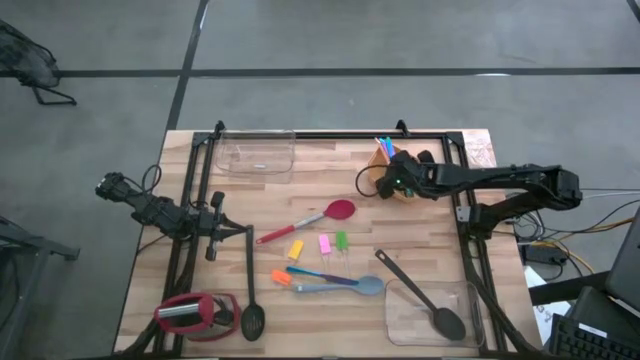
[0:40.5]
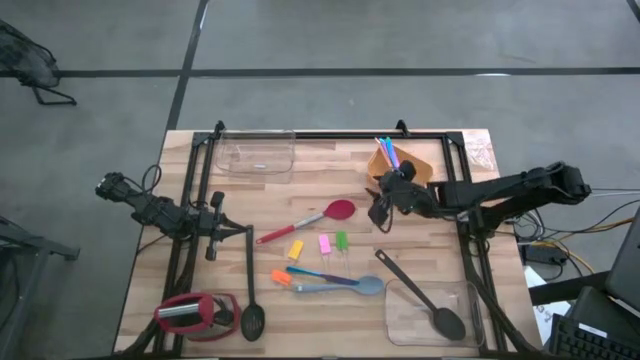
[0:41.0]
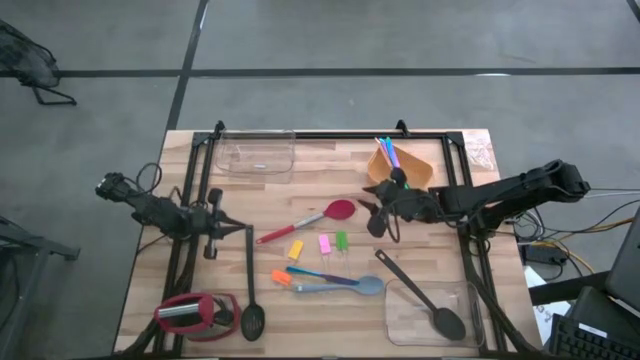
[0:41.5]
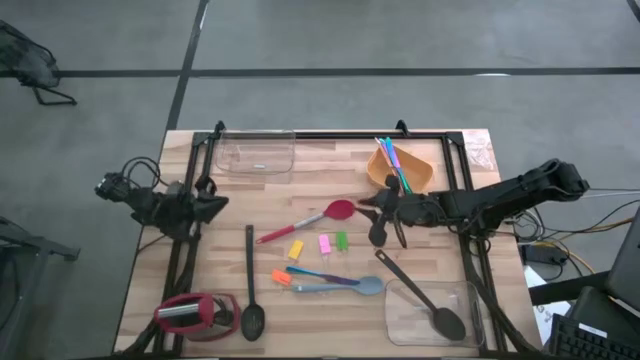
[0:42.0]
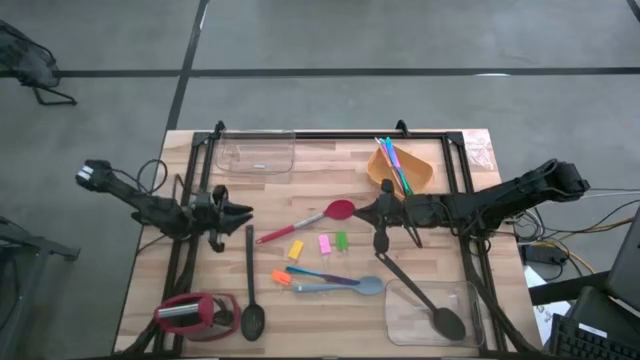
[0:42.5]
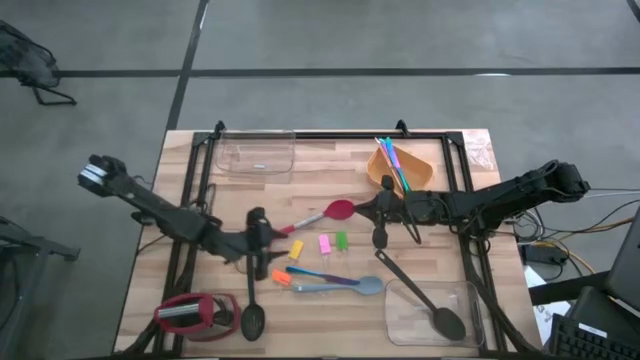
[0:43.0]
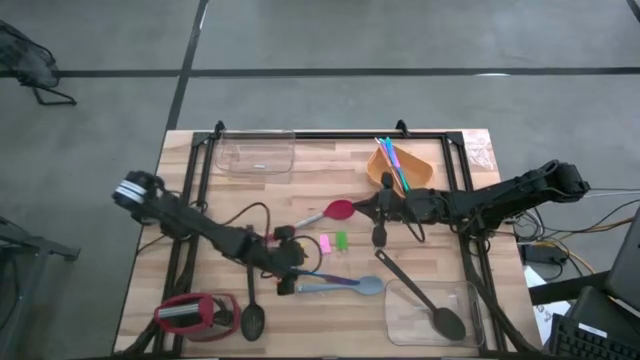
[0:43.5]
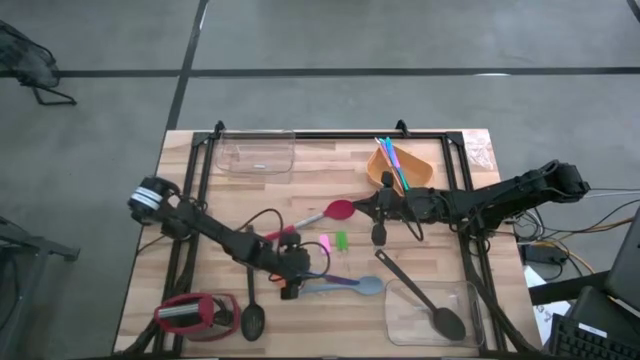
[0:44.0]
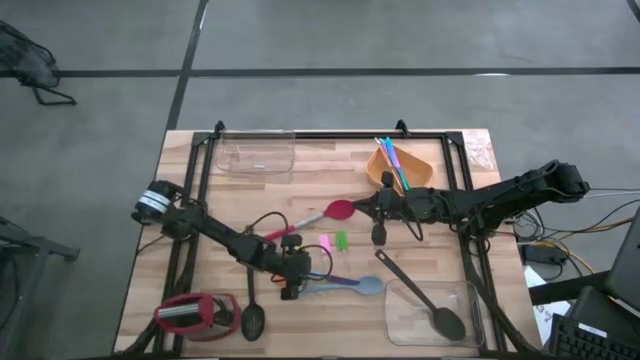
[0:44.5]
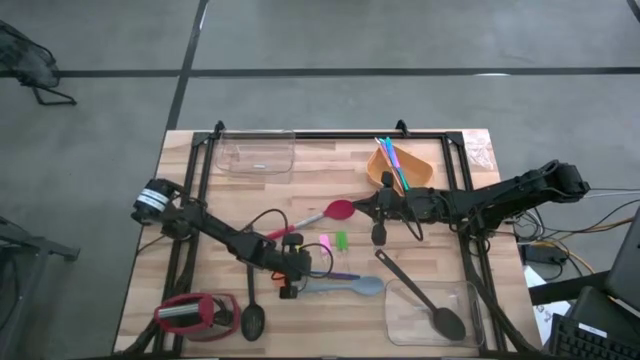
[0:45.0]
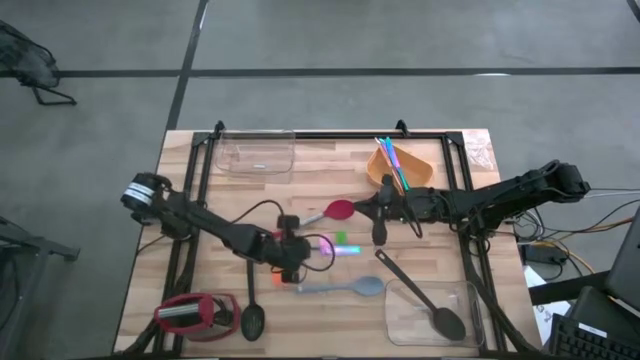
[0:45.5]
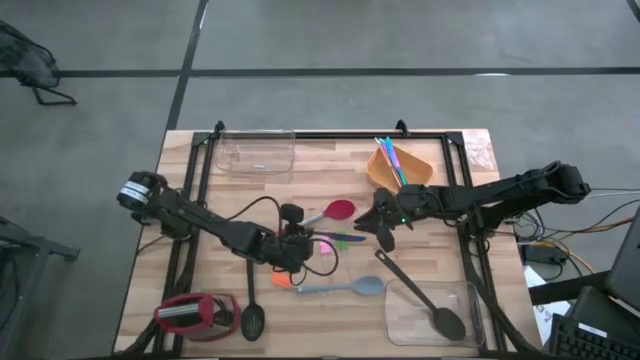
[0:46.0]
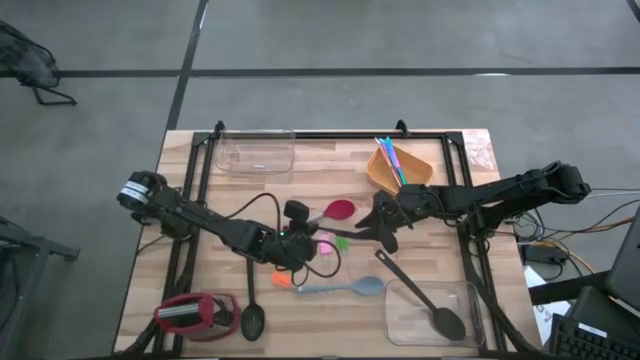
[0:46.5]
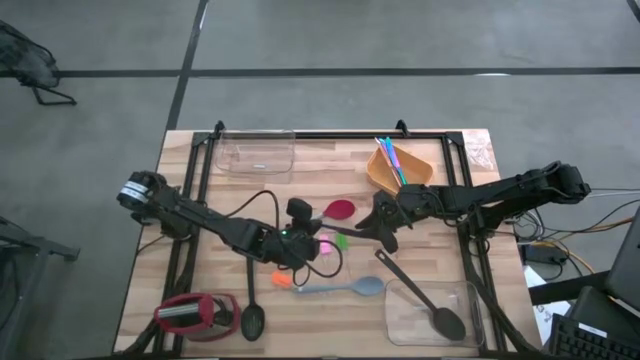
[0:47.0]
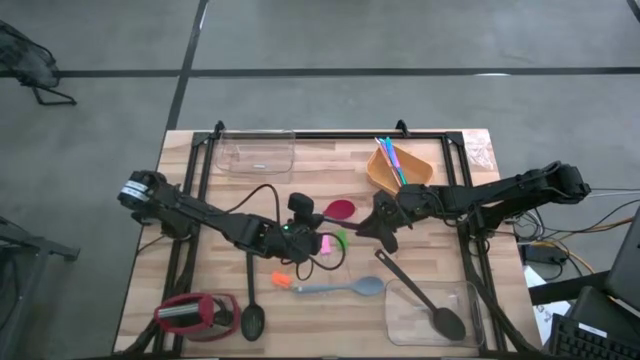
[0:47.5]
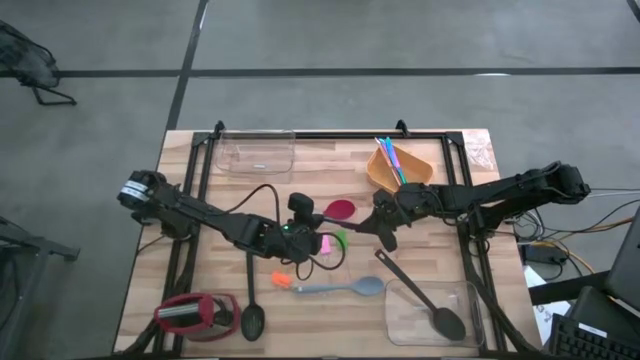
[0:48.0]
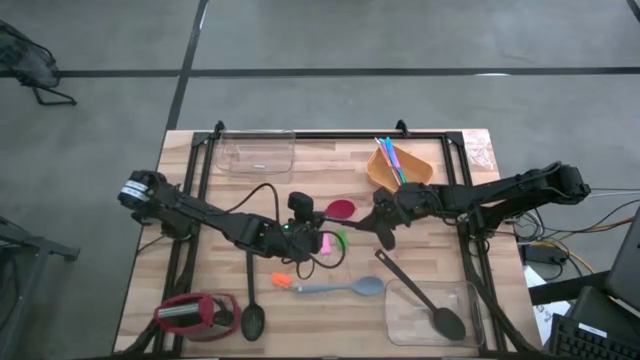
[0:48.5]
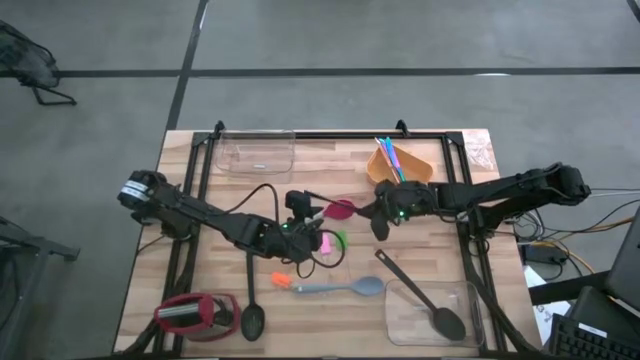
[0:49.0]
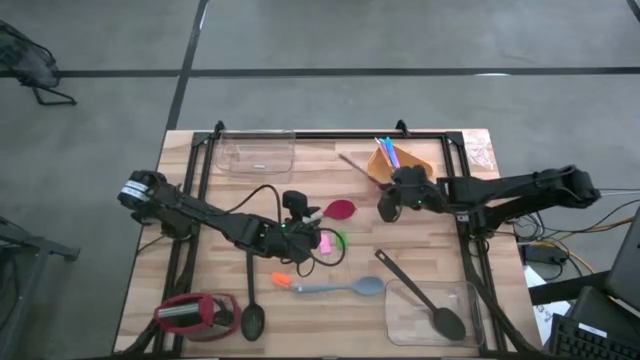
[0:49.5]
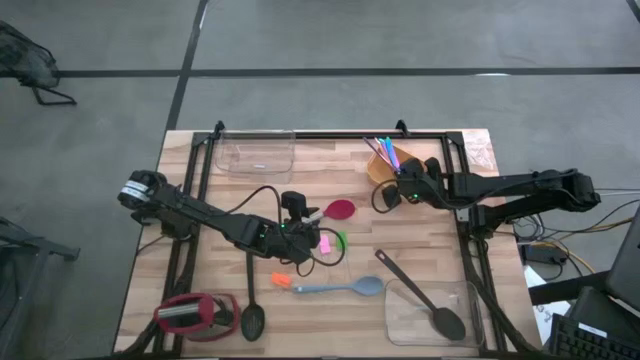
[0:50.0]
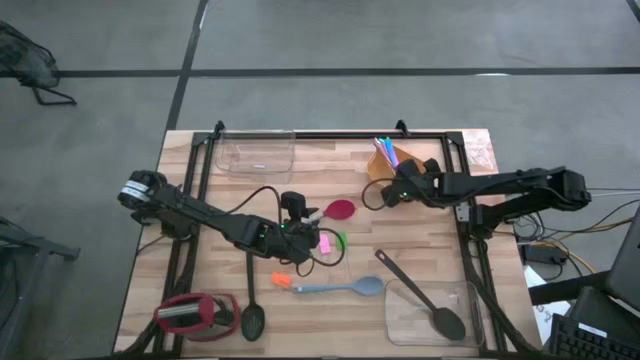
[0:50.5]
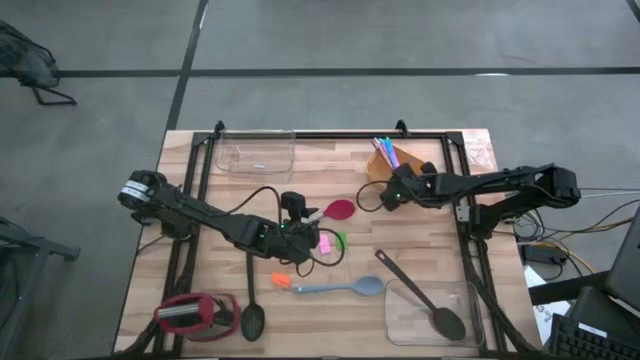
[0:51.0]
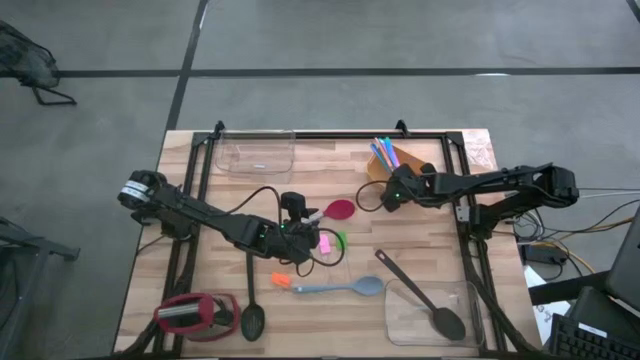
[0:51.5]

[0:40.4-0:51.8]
Task: Pick & Place Kitchen Items
Put the blue knife into the yellow bin

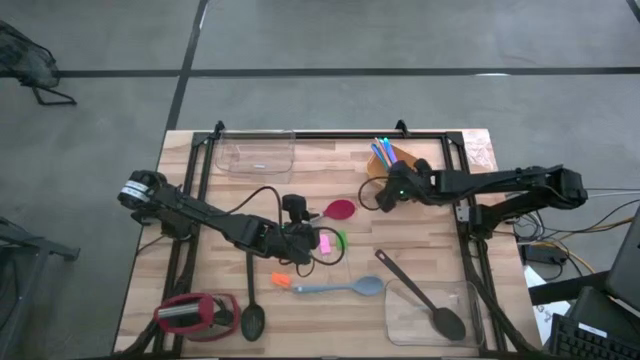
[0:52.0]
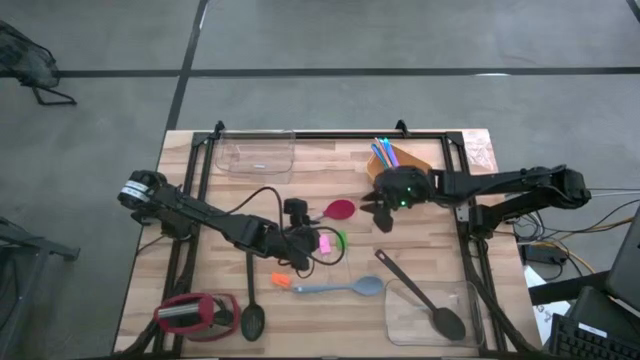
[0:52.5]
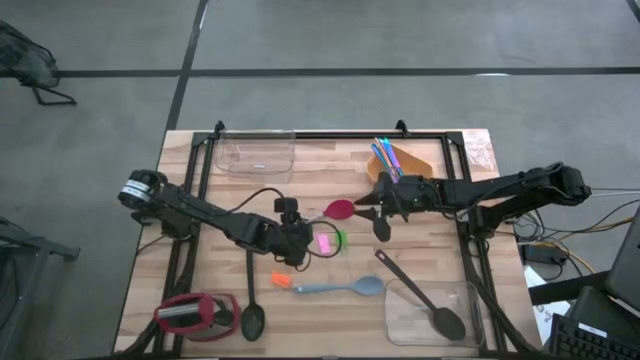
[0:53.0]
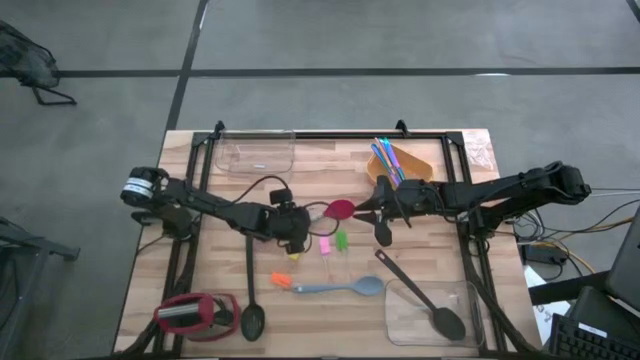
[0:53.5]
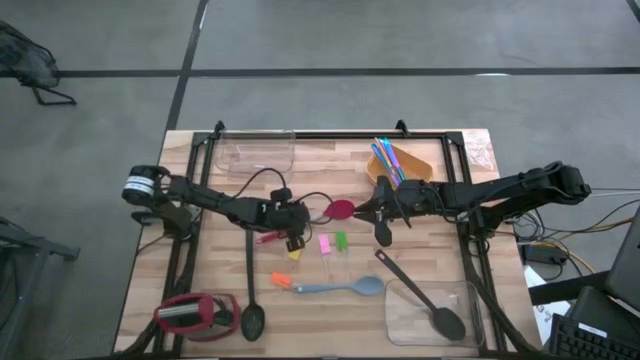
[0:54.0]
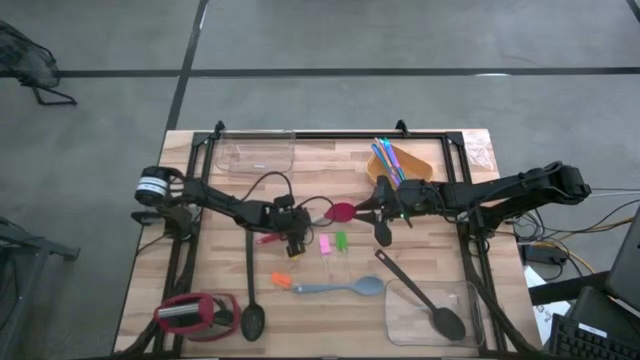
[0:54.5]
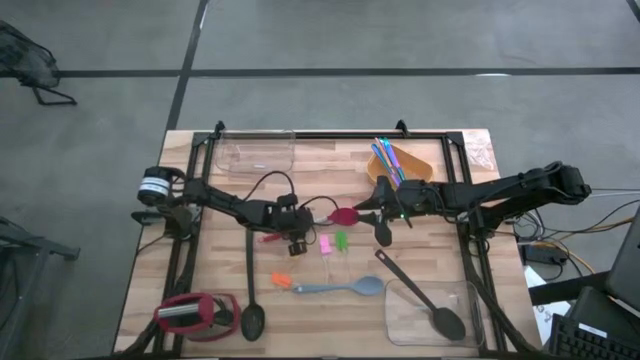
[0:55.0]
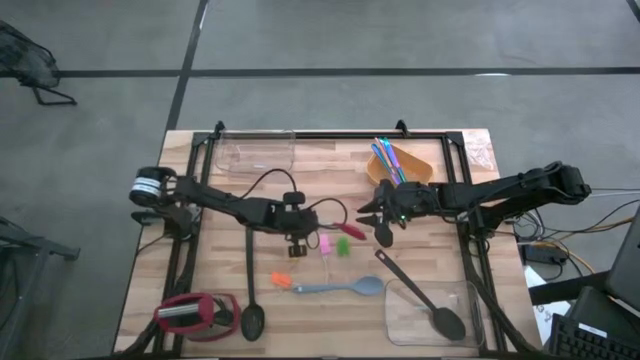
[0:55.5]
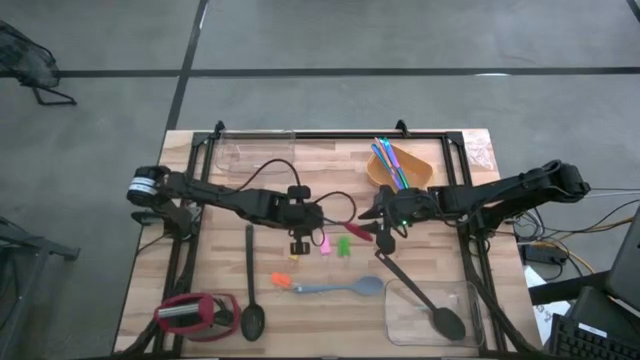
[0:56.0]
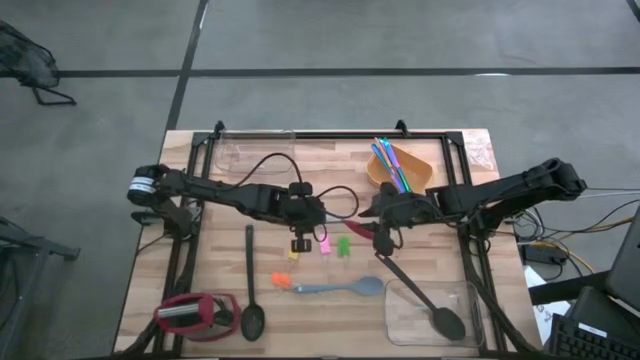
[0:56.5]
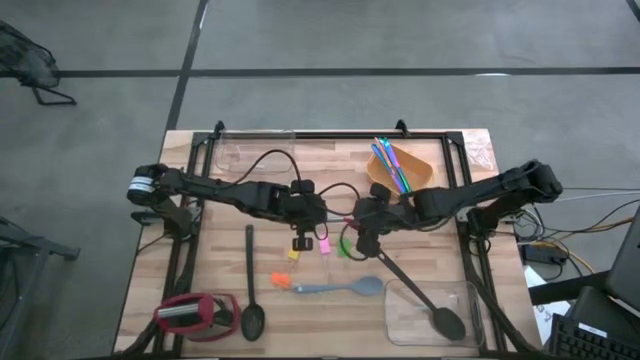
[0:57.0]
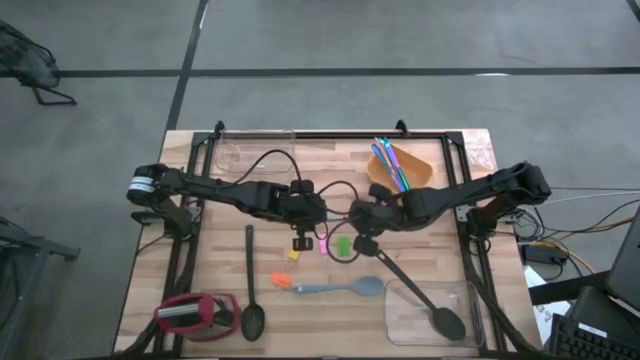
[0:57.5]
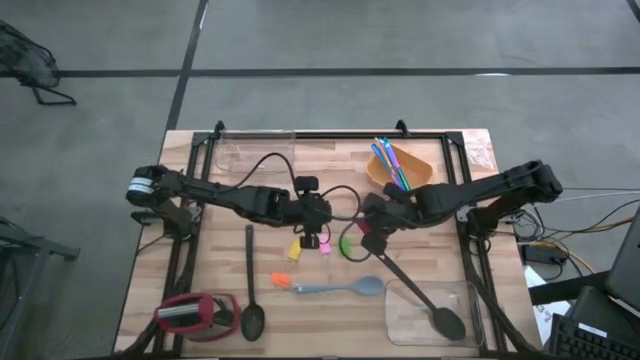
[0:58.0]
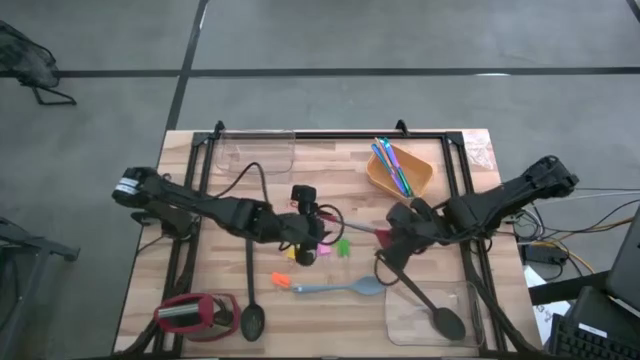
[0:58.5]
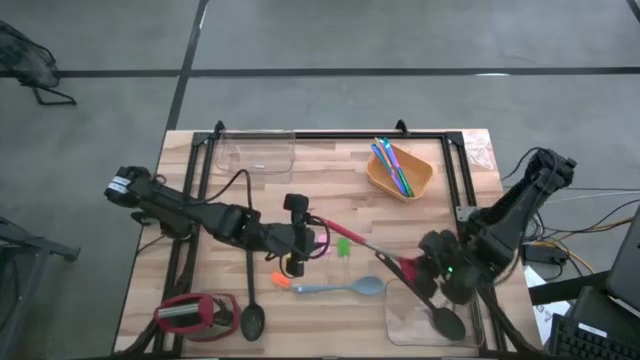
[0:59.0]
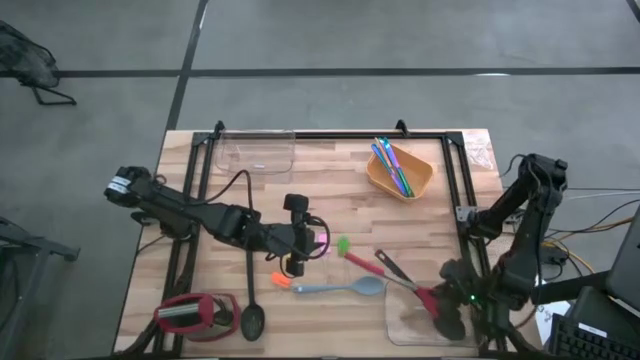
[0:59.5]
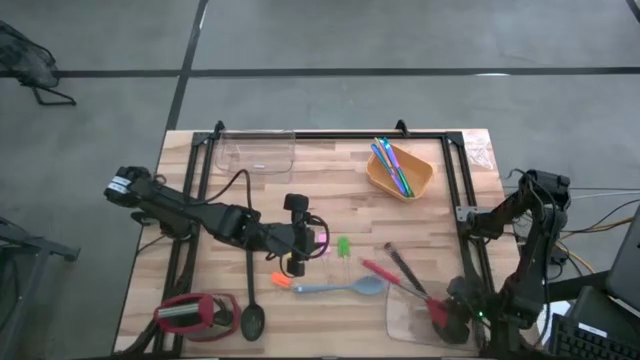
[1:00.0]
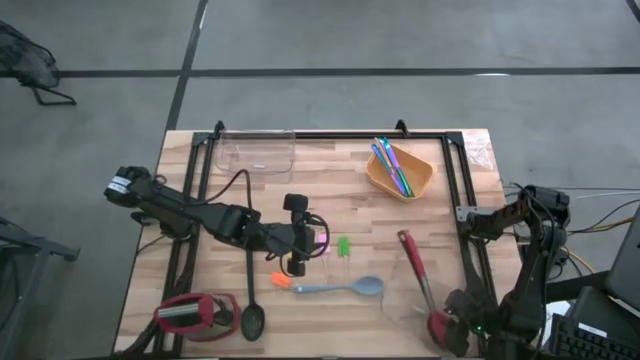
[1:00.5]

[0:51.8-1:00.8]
Put the red serving spoon into the bottom transparent bin
